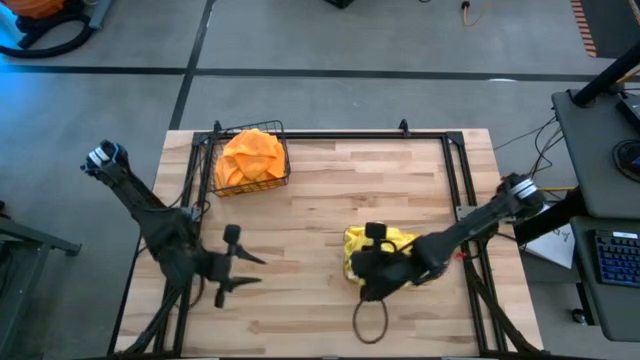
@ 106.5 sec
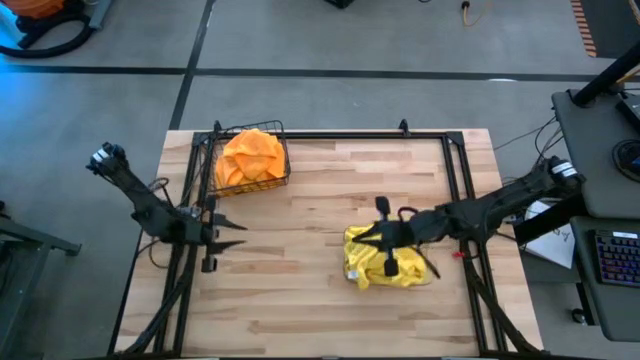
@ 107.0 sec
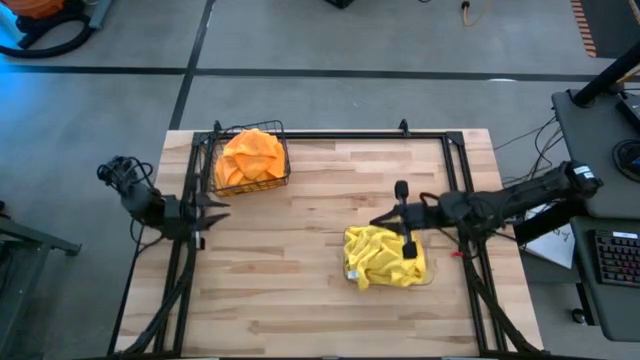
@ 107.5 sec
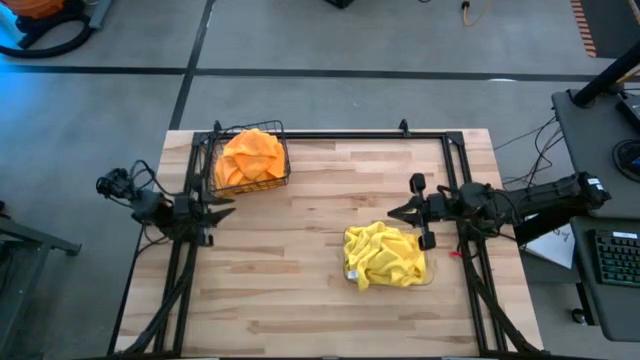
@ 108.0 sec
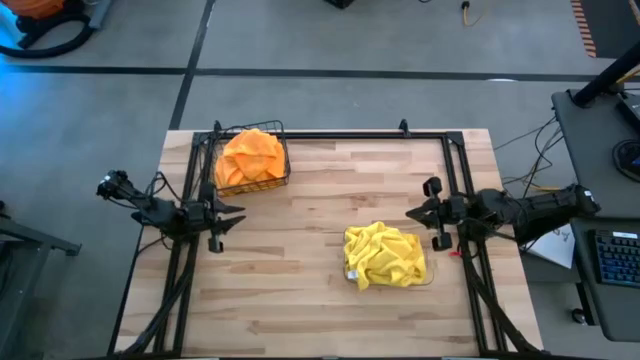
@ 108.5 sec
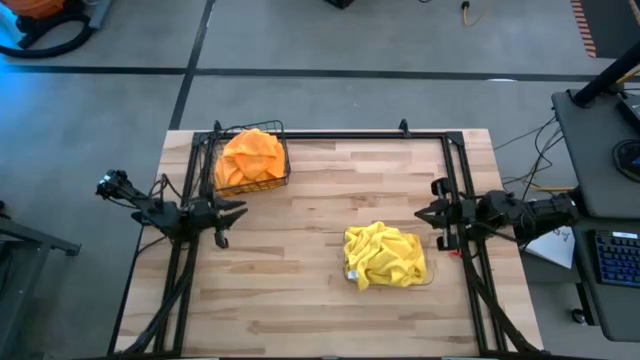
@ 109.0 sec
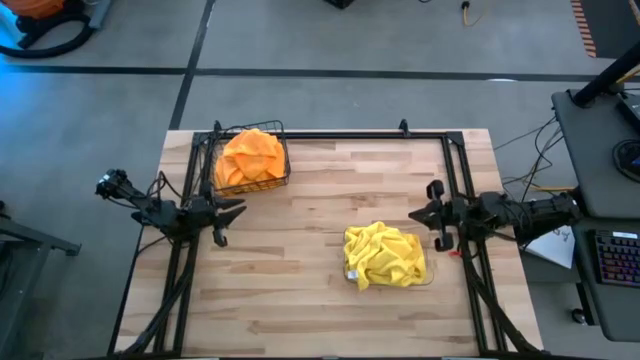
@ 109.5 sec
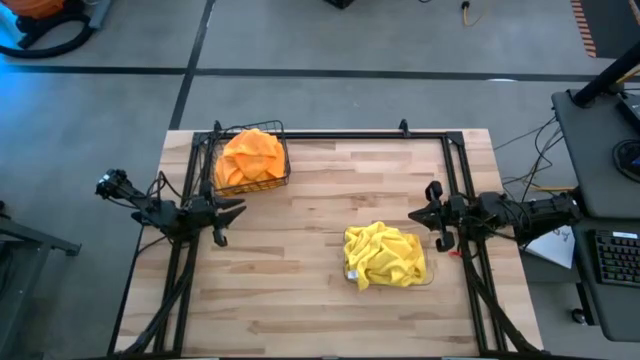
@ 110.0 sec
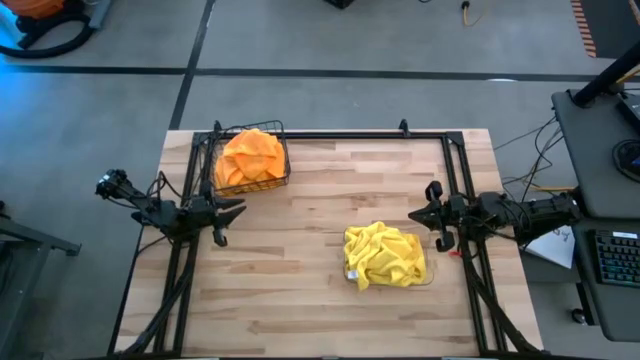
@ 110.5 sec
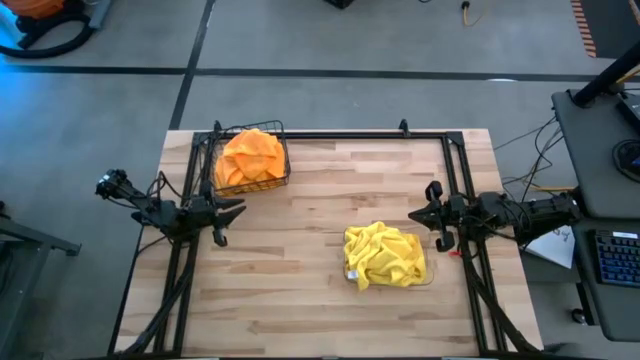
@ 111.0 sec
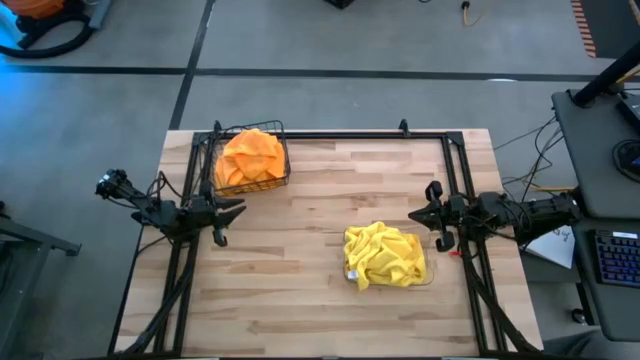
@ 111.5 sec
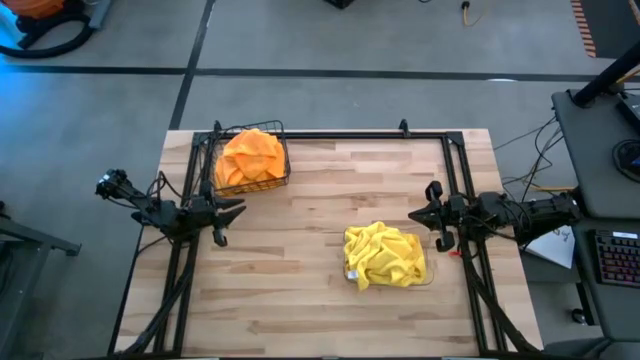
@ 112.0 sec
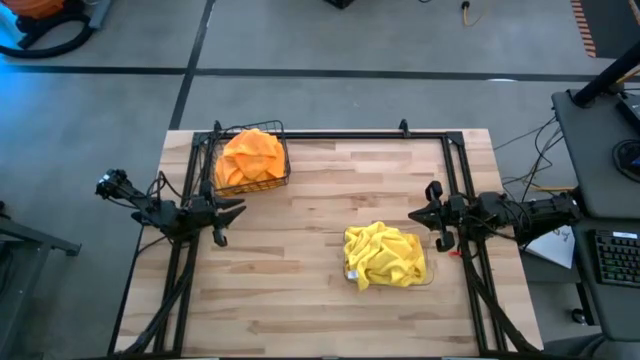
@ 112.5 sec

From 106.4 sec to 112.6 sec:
Task: Sort microfiber towel by color & place in baskets
Return to Home Position

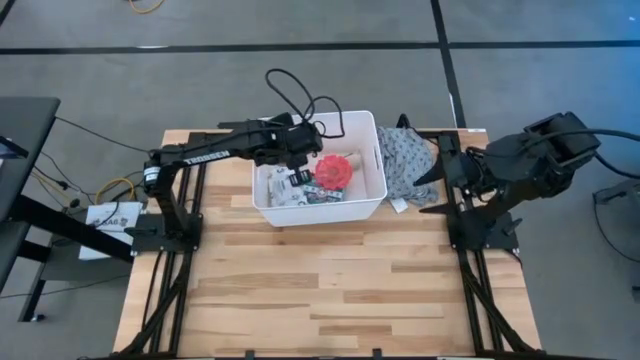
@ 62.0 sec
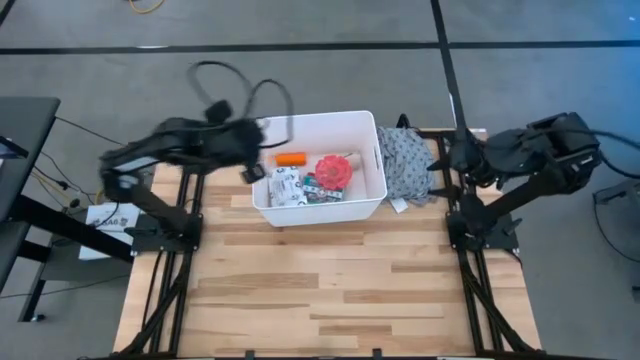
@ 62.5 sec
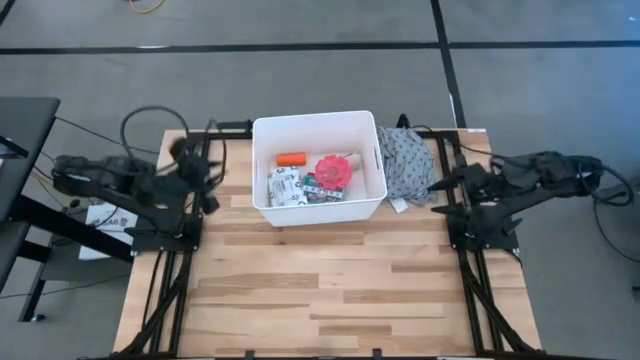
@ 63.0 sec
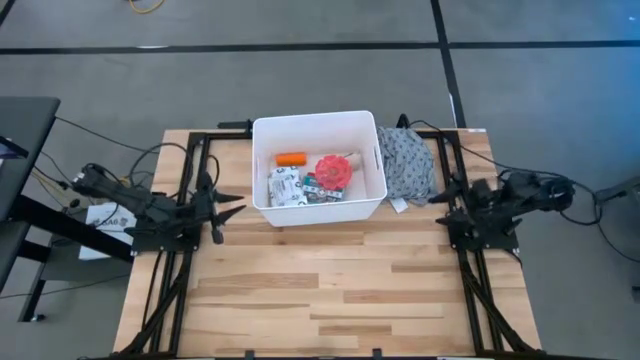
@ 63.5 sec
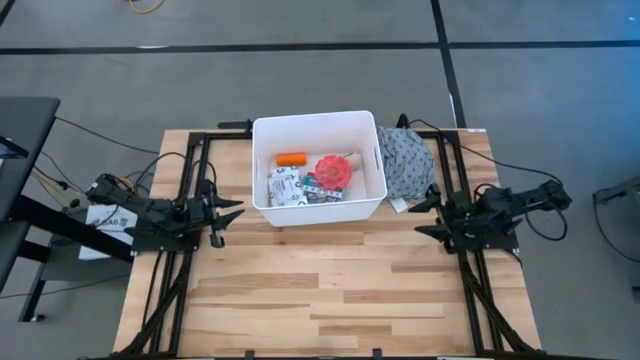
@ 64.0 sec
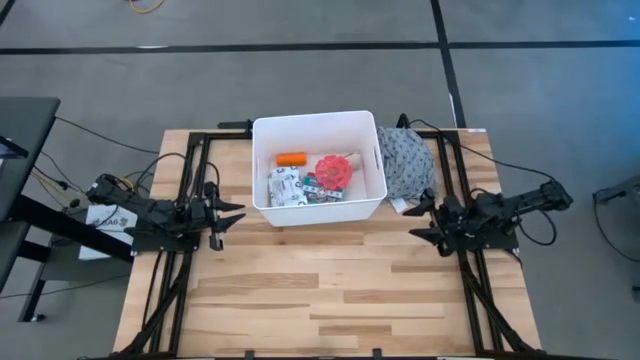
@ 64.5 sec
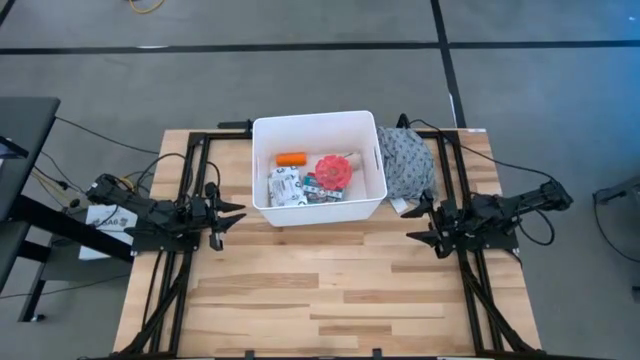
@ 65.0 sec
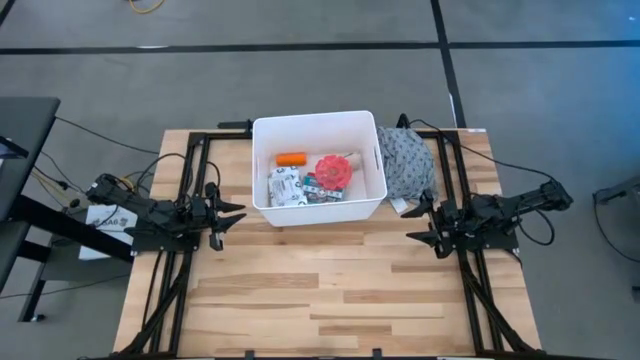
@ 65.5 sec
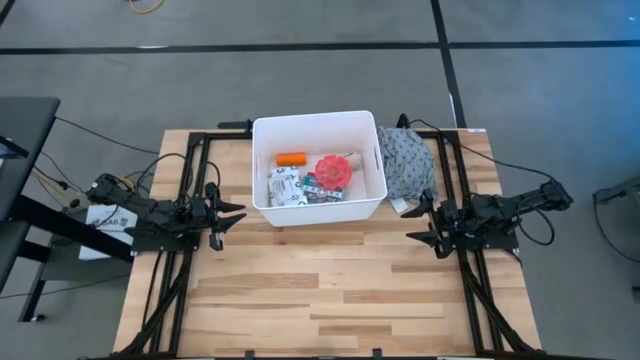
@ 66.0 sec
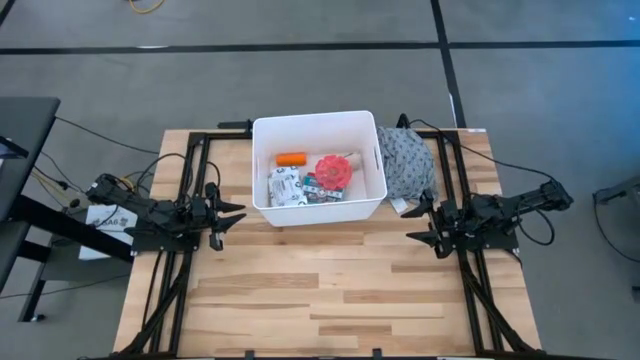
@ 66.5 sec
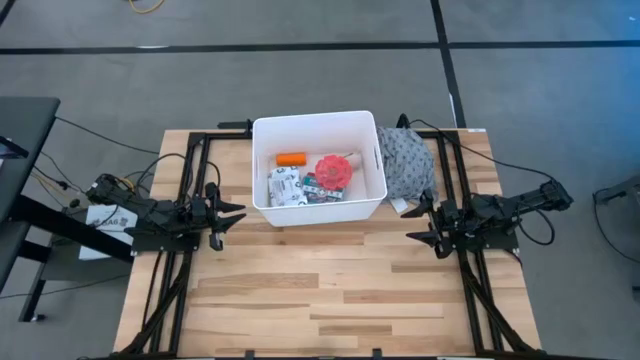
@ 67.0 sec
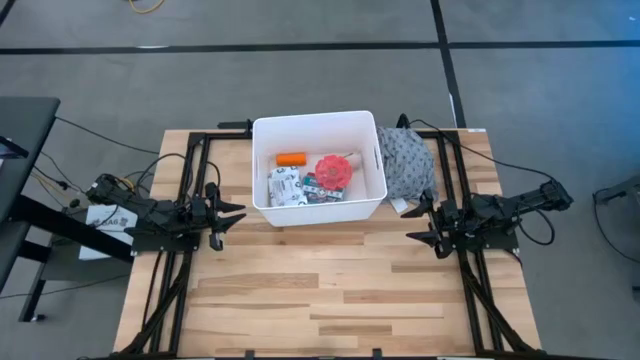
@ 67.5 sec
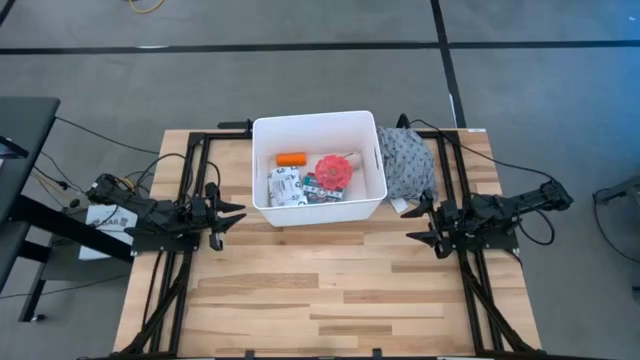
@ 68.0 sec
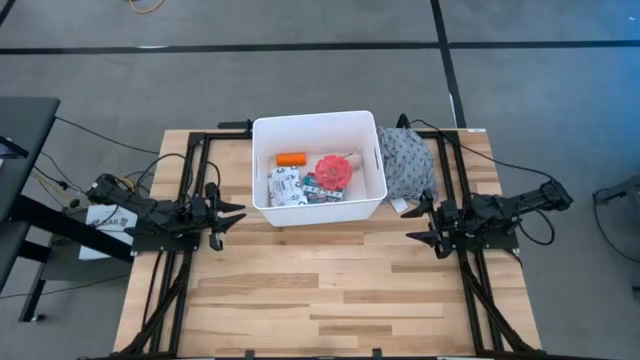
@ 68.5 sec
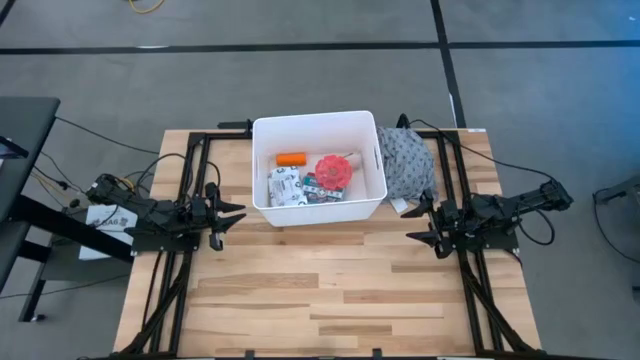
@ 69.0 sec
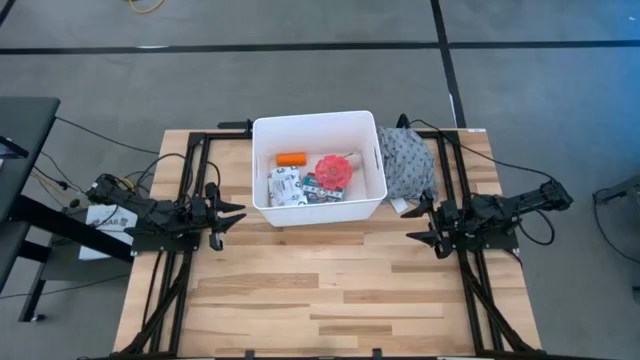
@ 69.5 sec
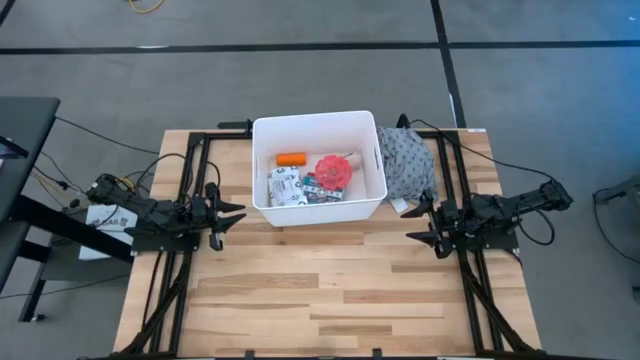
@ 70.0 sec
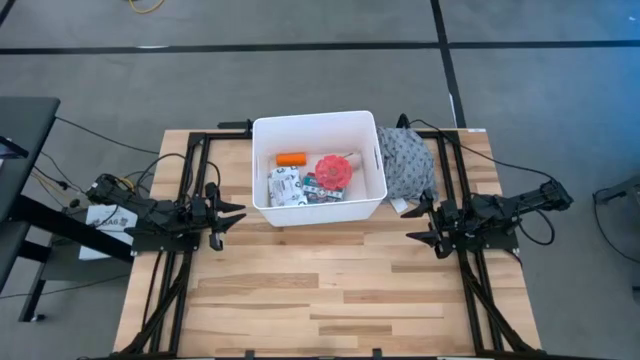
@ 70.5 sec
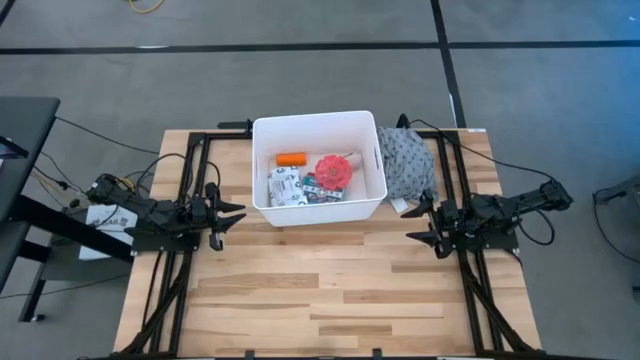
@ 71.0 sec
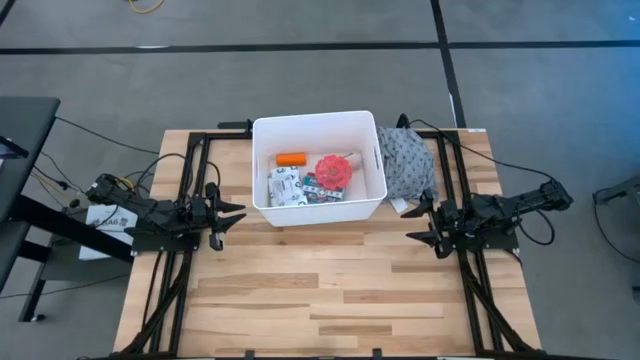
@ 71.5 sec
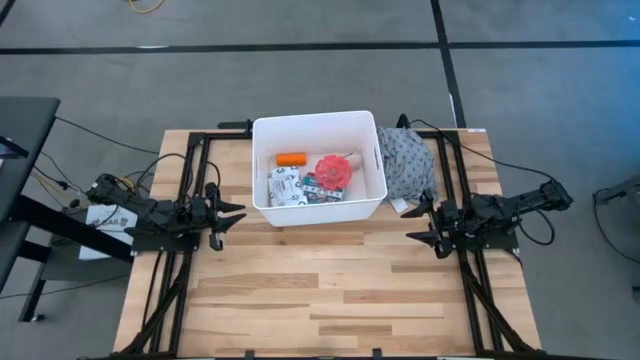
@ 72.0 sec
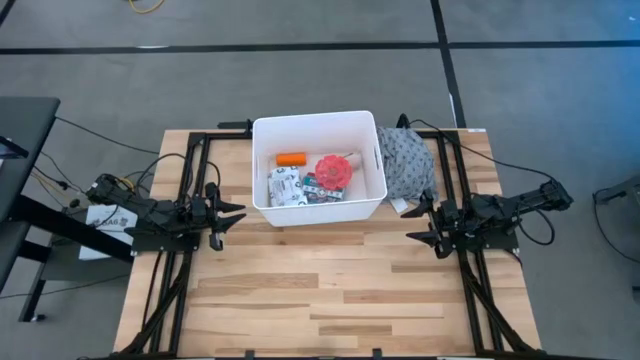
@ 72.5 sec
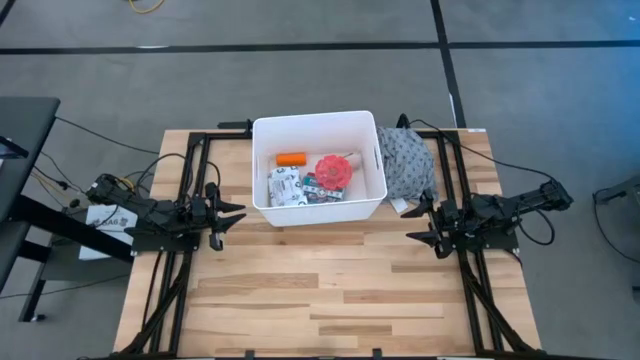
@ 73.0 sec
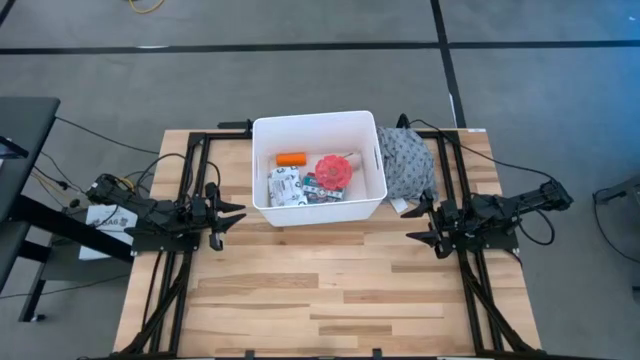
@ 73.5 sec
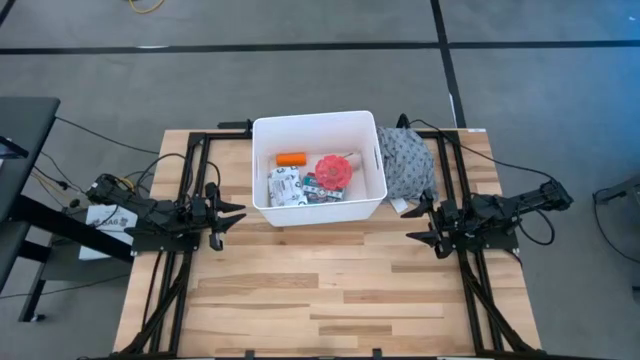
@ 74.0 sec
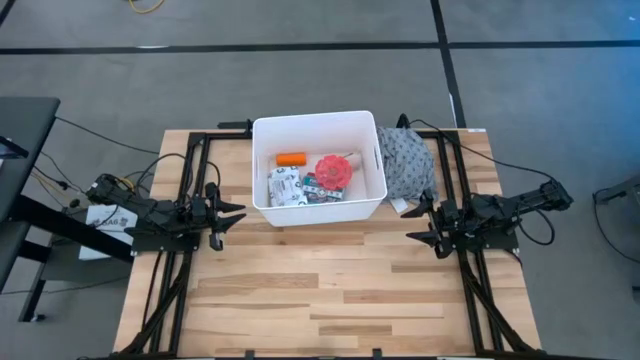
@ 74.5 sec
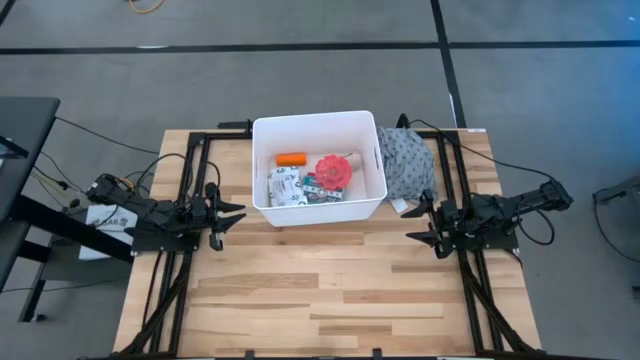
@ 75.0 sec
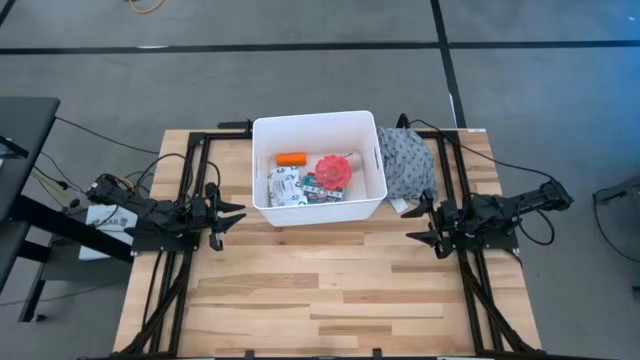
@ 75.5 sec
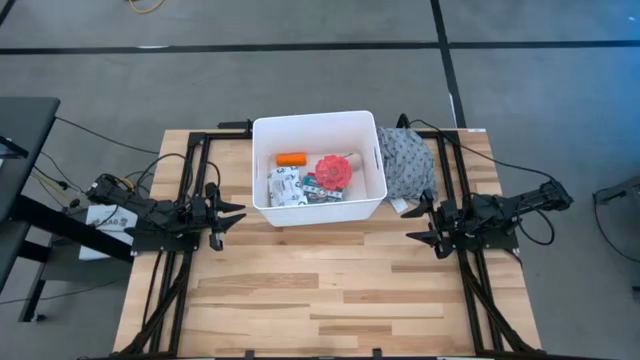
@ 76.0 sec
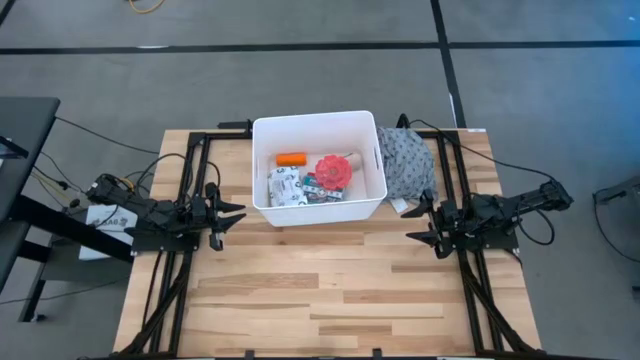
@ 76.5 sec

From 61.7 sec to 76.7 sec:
Task: Pick & place medical supplies in basket/bin
Return to Home Position
